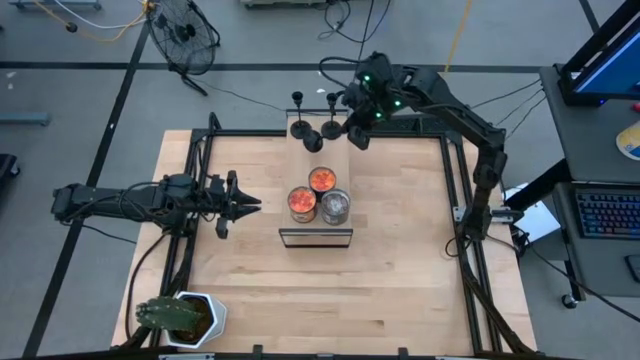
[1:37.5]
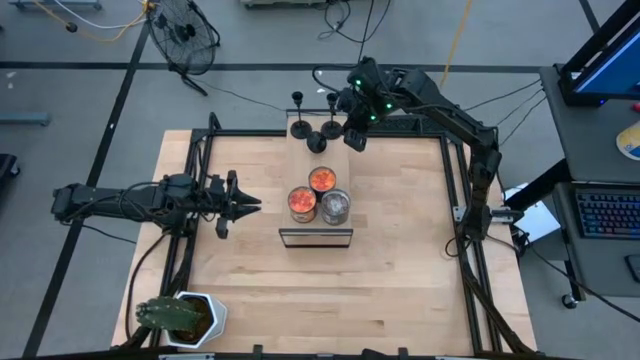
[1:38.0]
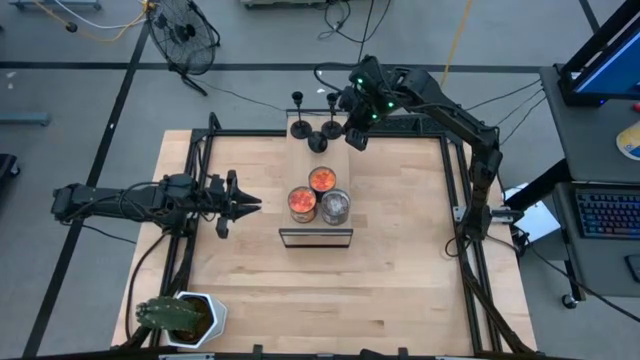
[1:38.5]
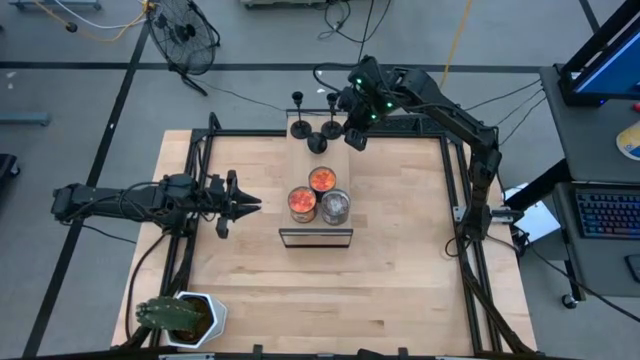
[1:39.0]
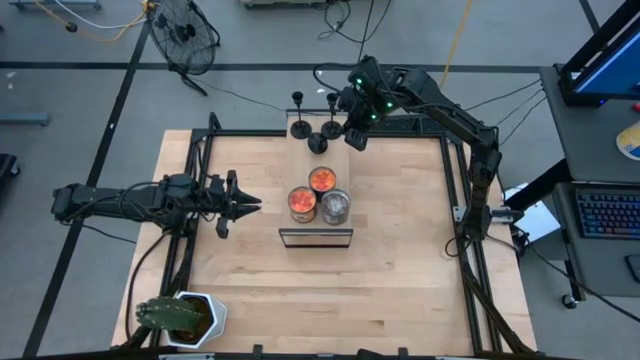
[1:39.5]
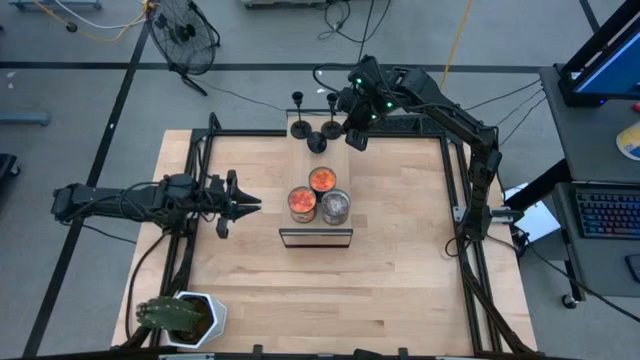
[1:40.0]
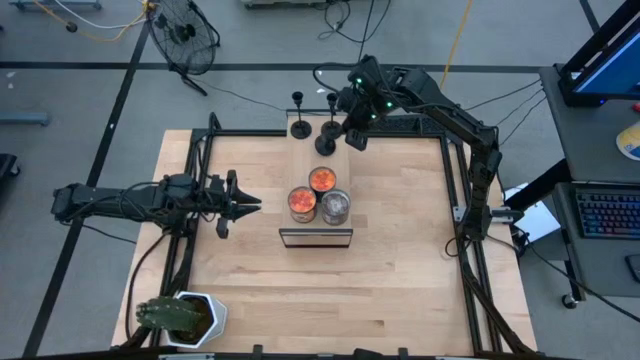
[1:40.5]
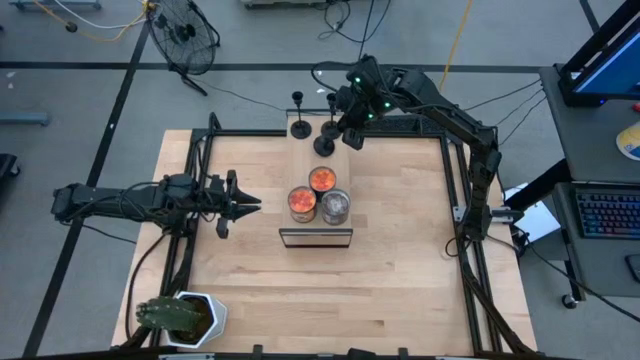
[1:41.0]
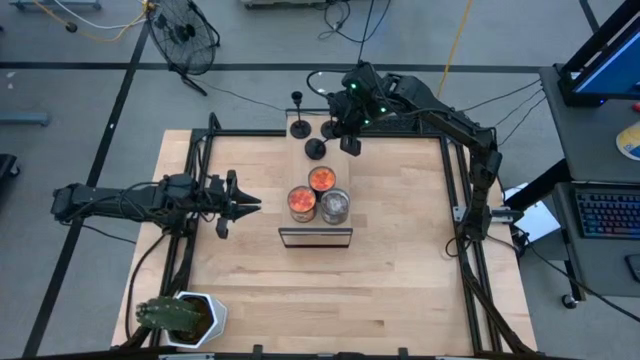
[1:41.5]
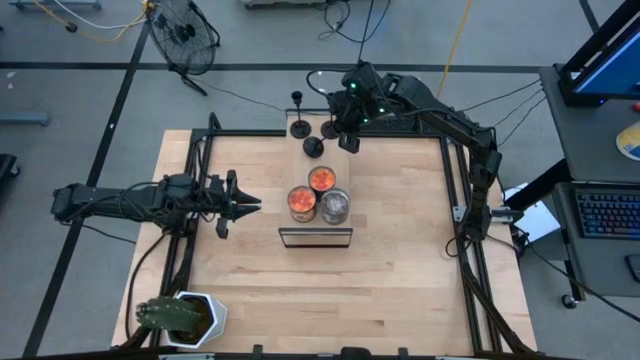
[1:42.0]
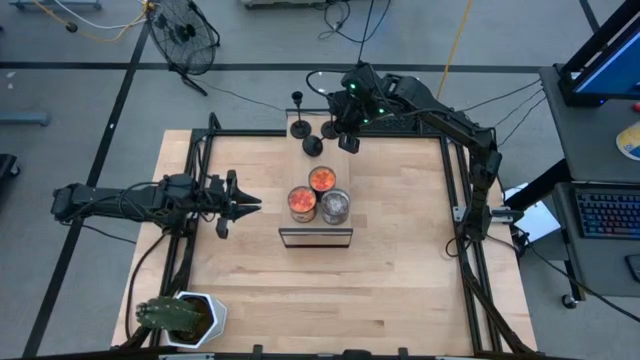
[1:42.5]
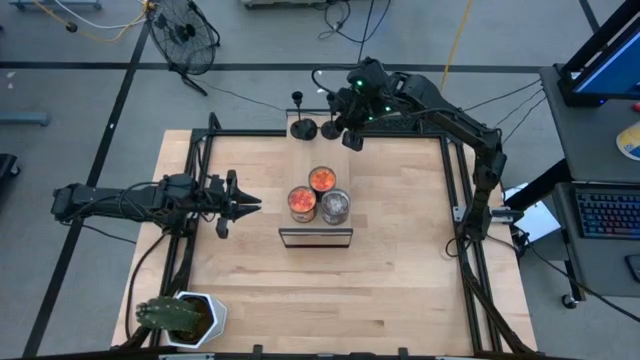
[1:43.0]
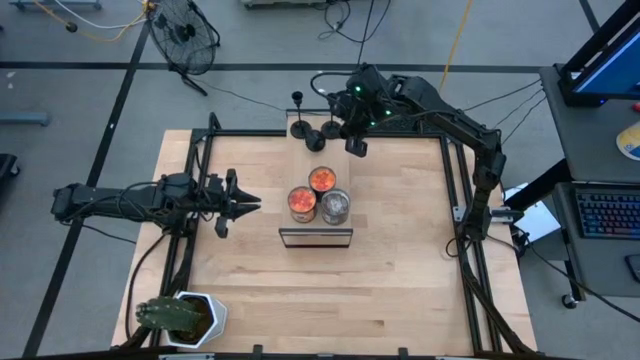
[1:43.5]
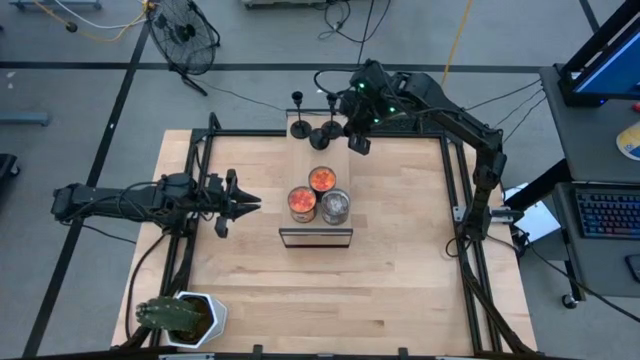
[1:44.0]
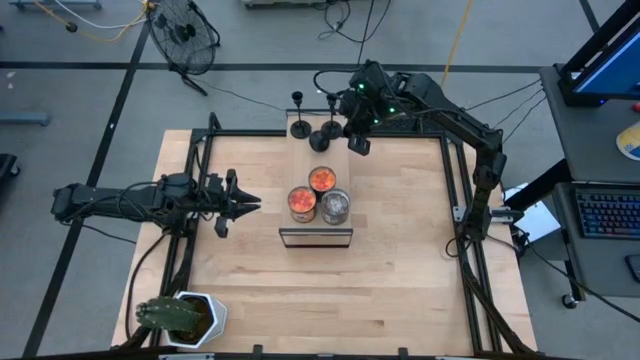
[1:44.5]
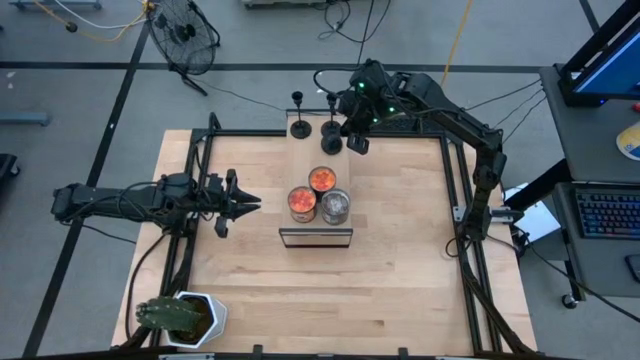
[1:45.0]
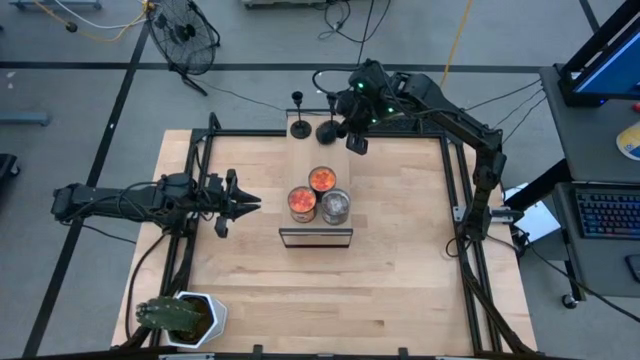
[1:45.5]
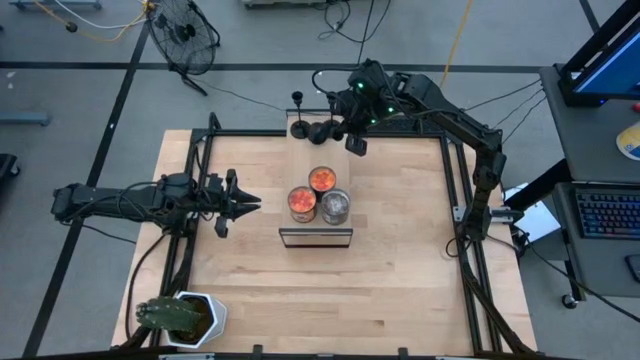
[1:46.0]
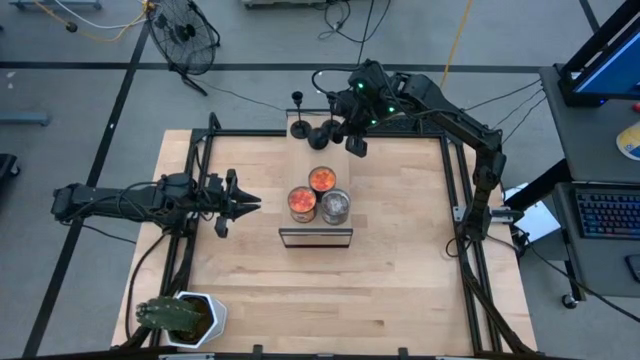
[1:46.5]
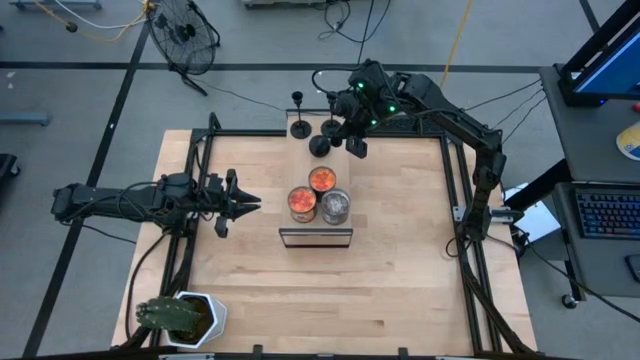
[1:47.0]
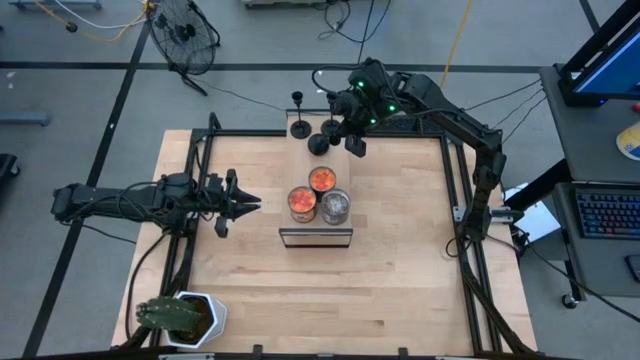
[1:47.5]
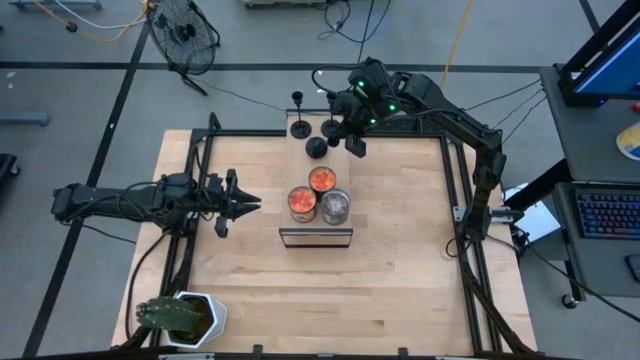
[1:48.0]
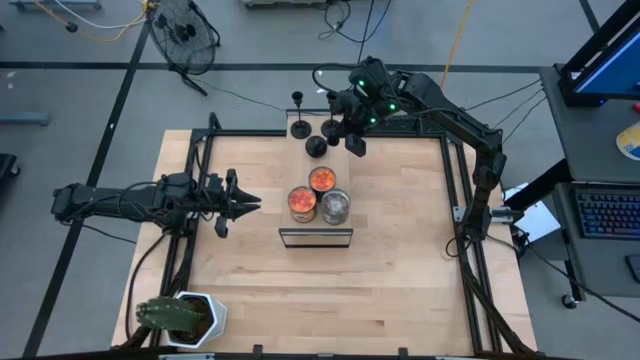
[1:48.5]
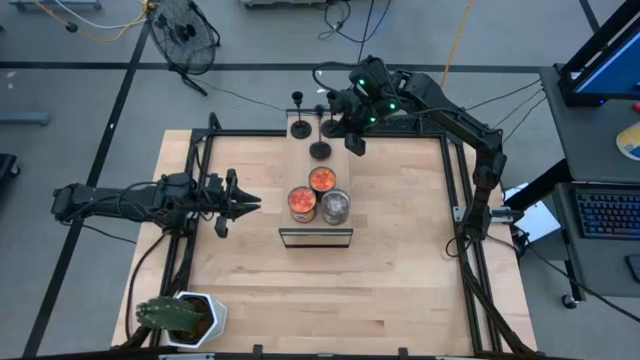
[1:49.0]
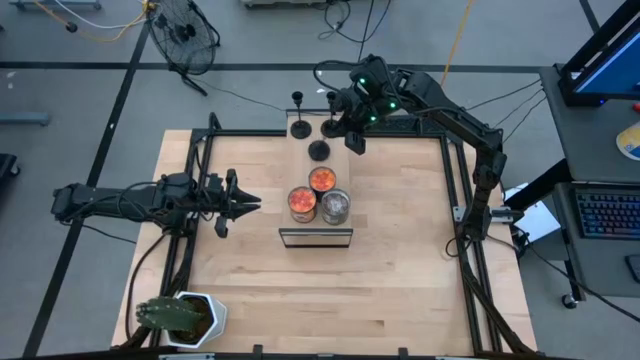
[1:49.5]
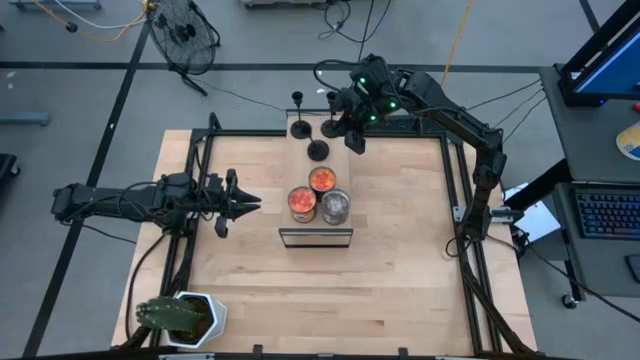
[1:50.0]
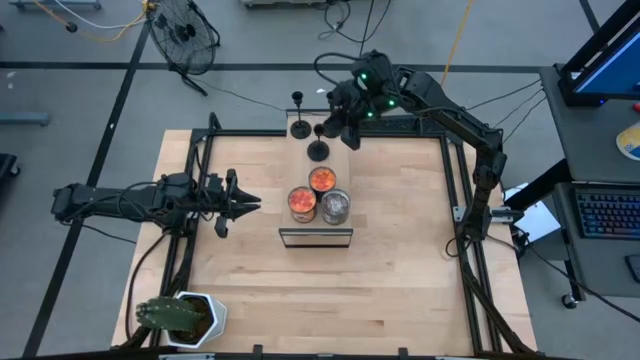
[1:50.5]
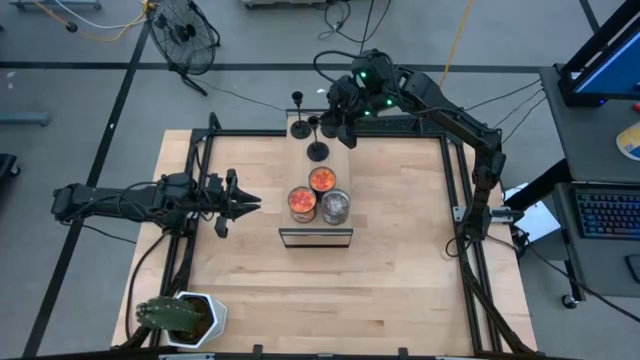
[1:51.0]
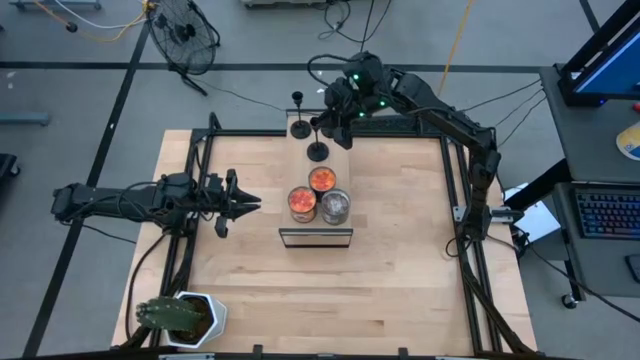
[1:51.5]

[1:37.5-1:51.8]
Task: Pick & Place candle stick holders
Put the black candle holder on the shelf

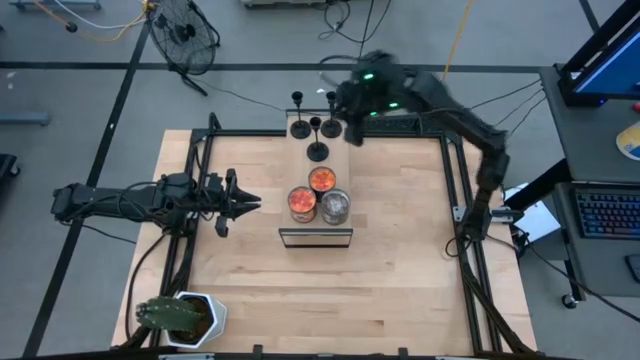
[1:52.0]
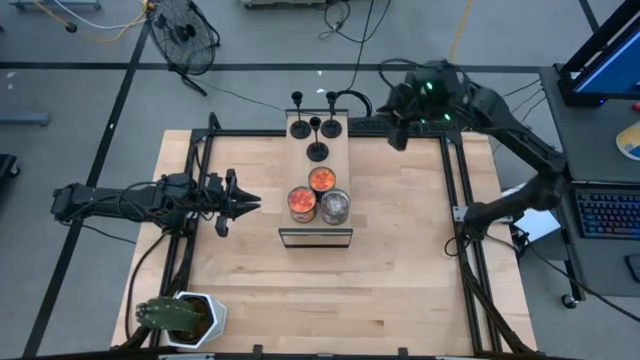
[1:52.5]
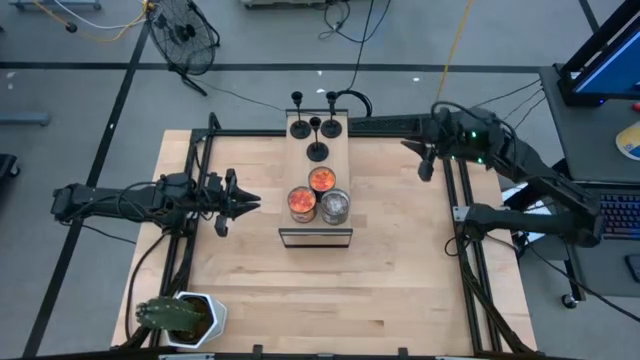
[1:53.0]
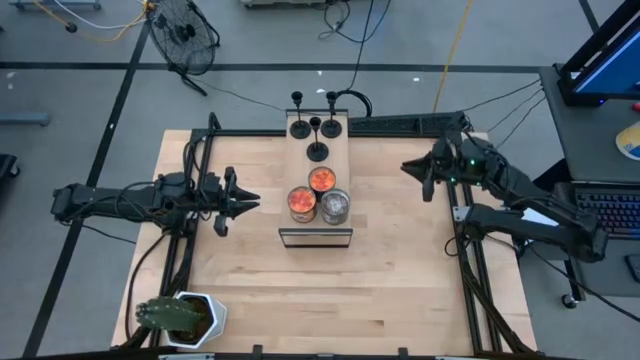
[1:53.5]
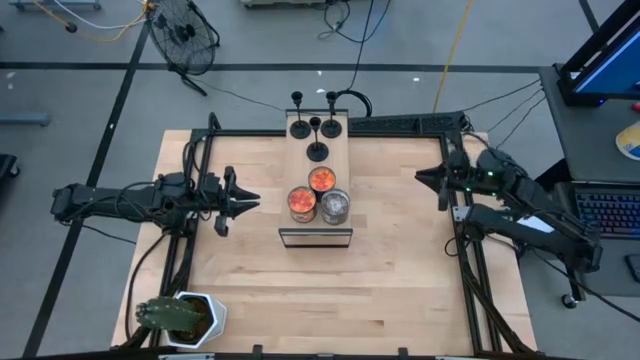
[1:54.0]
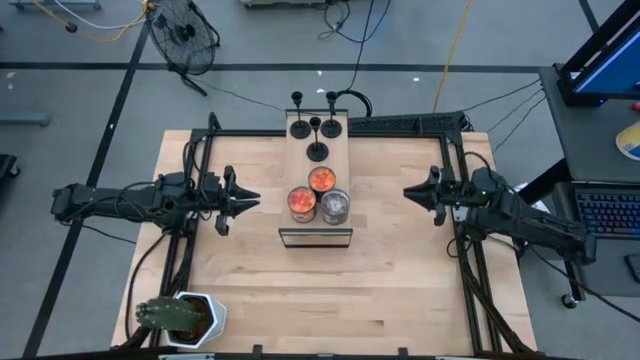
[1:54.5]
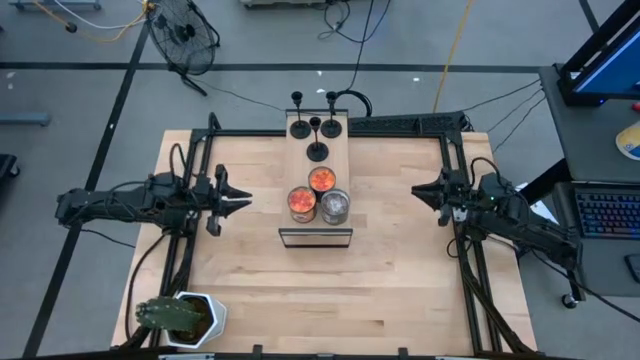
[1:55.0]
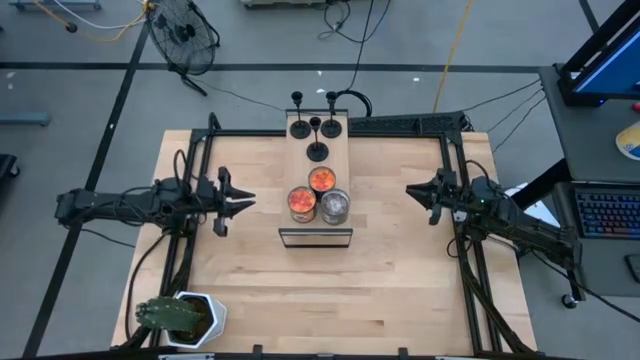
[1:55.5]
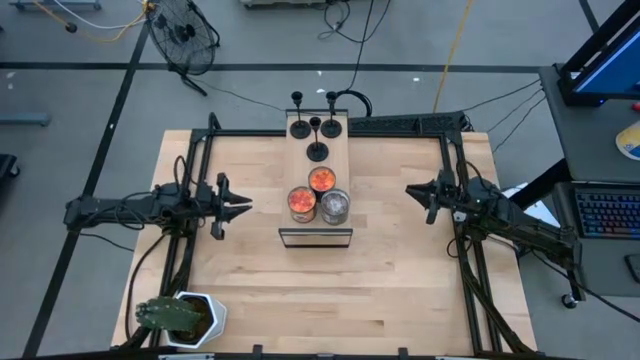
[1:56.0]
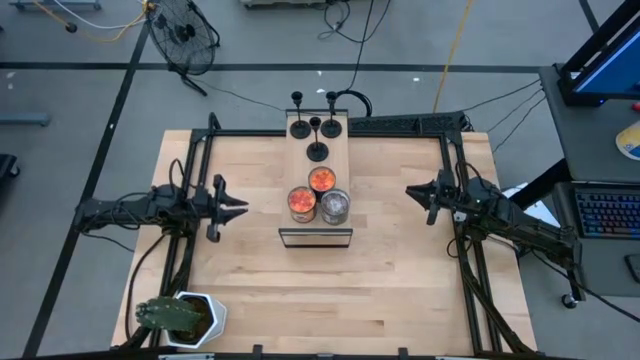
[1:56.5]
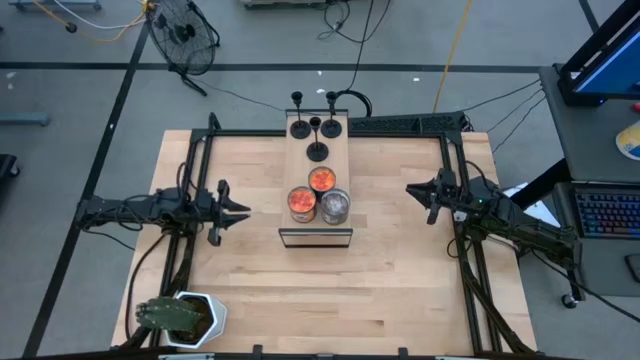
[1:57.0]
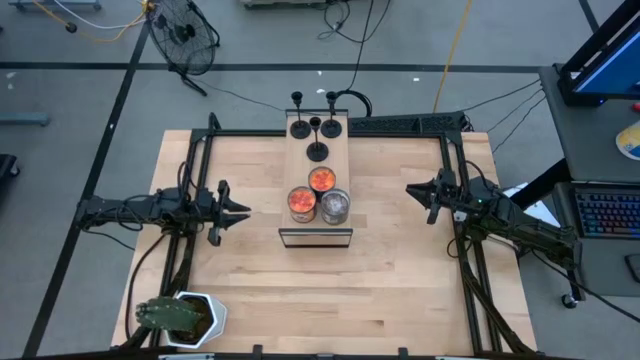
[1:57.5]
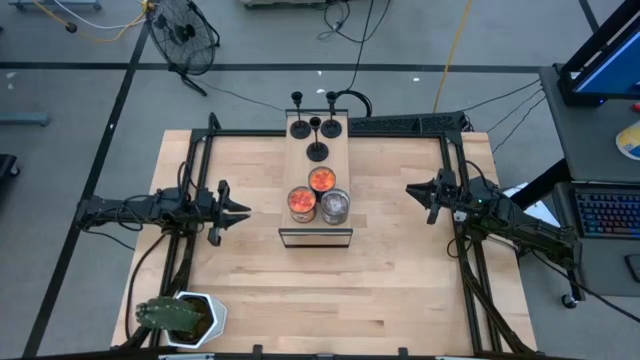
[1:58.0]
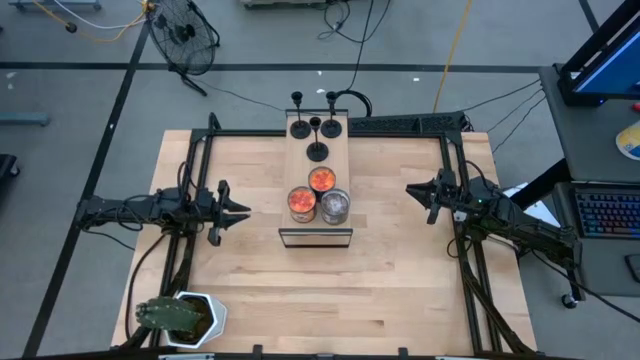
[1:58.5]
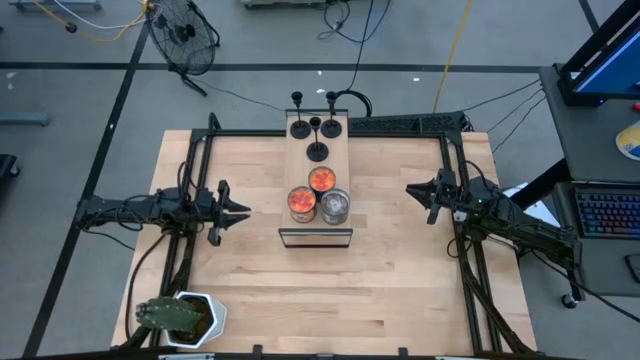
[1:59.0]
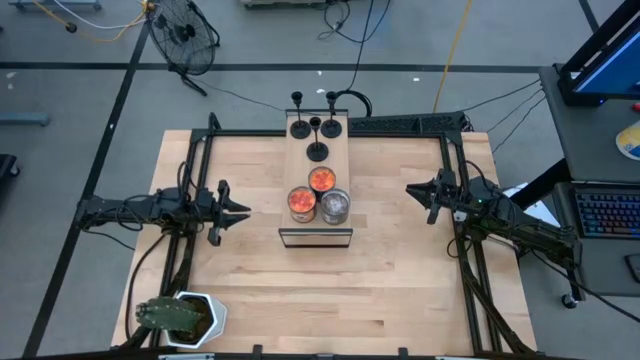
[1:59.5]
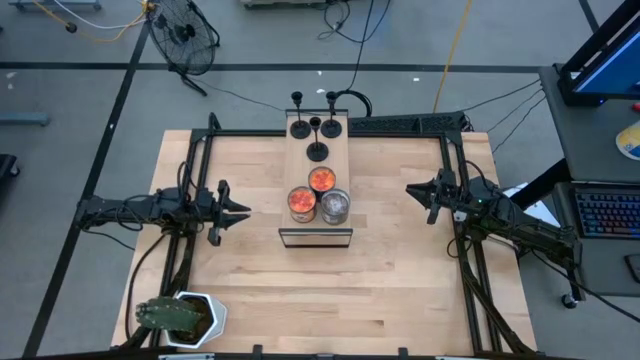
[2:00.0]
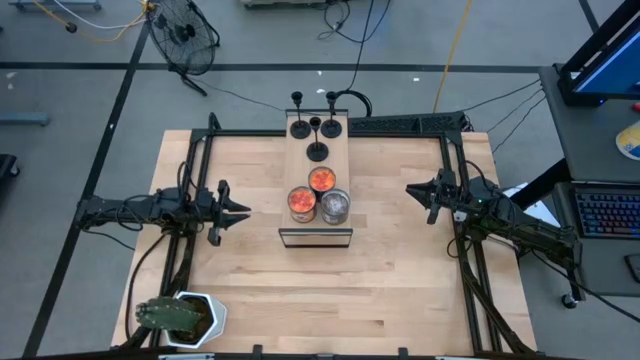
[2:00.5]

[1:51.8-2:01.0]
Return to Home Position
